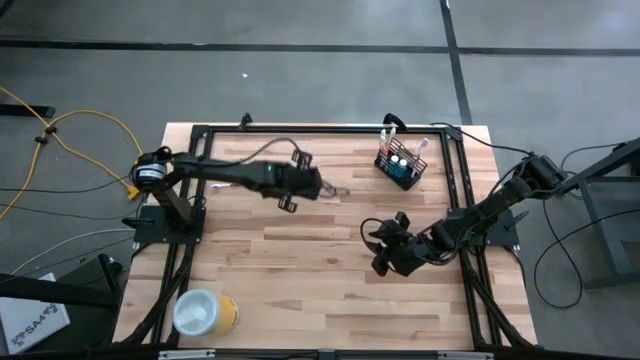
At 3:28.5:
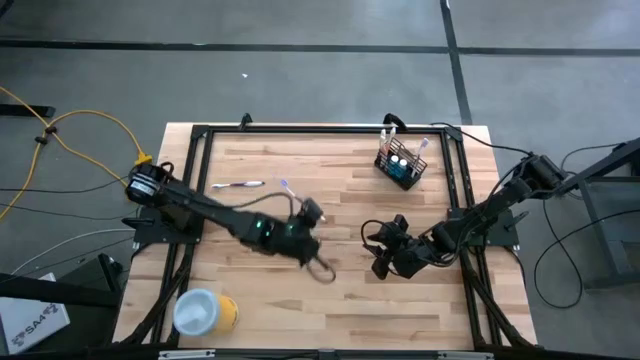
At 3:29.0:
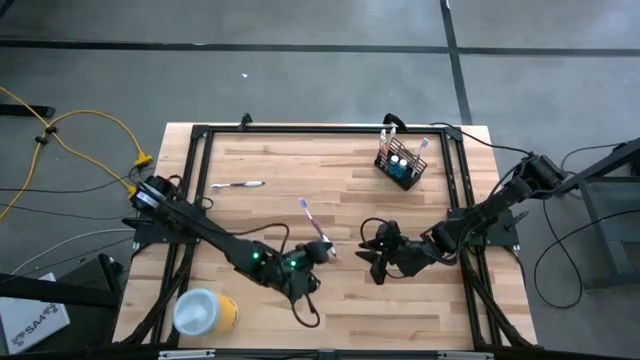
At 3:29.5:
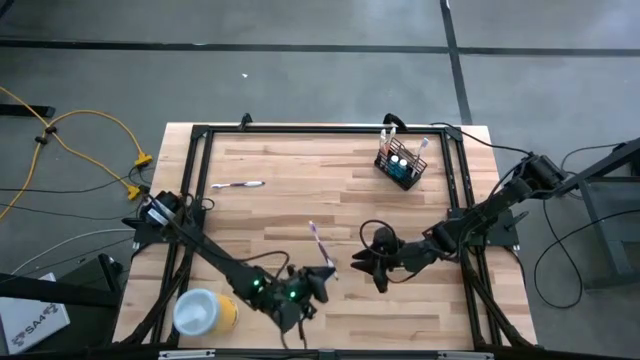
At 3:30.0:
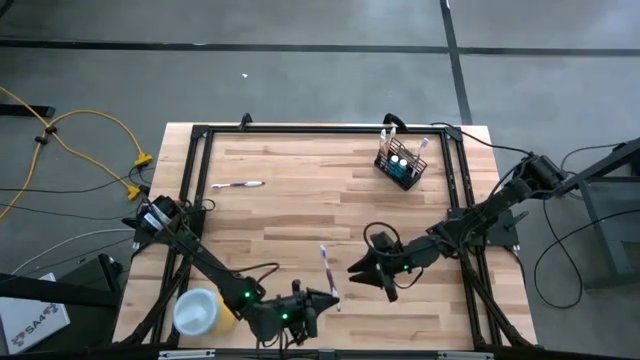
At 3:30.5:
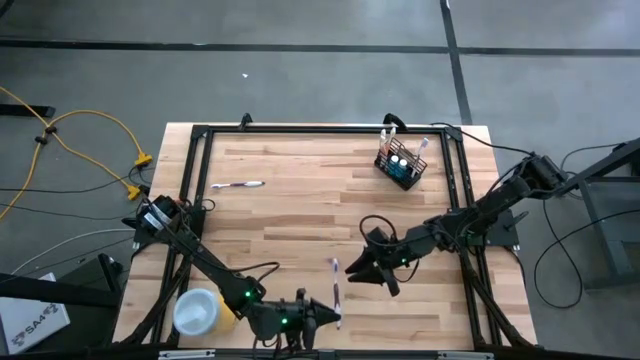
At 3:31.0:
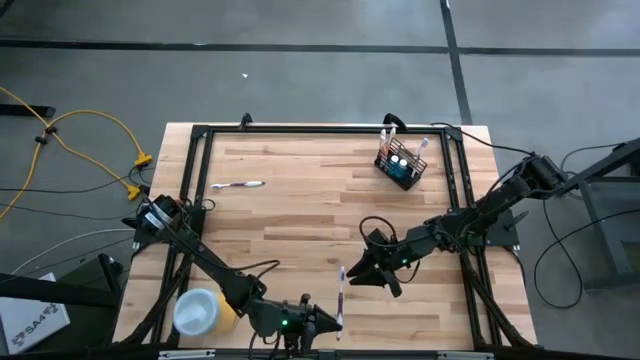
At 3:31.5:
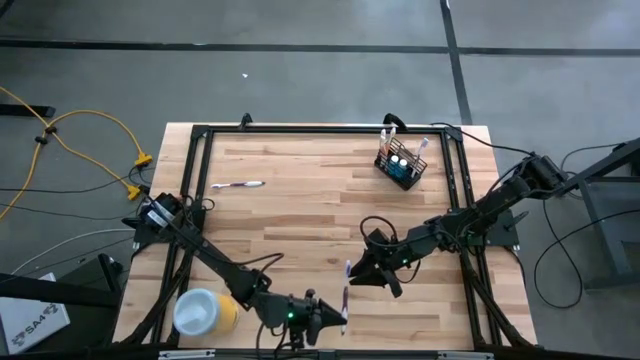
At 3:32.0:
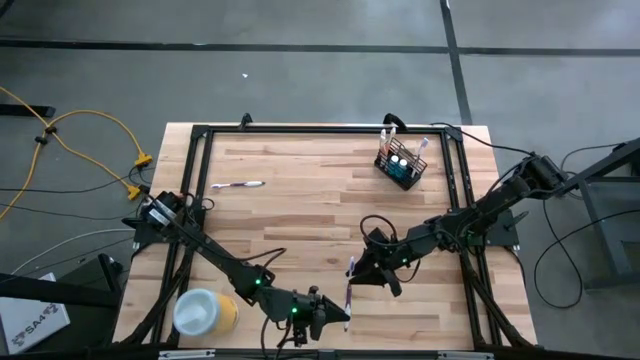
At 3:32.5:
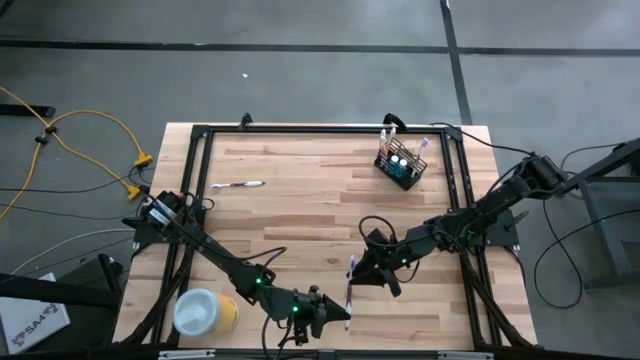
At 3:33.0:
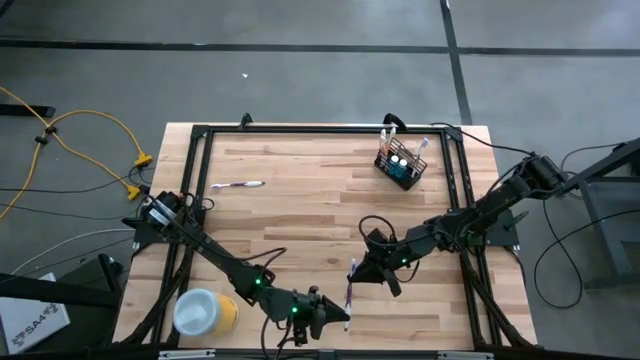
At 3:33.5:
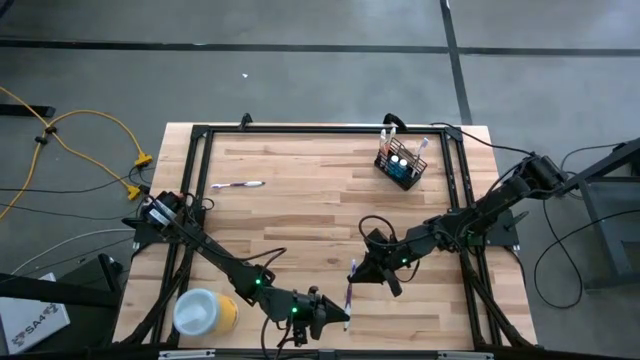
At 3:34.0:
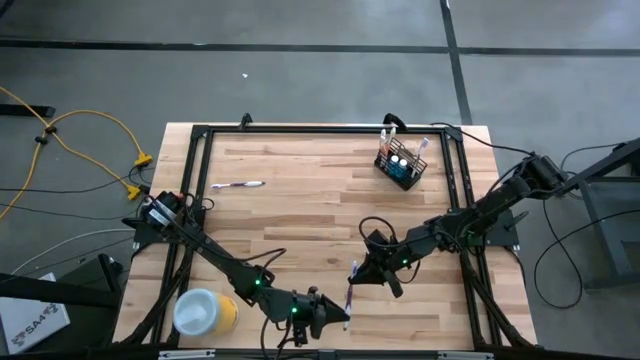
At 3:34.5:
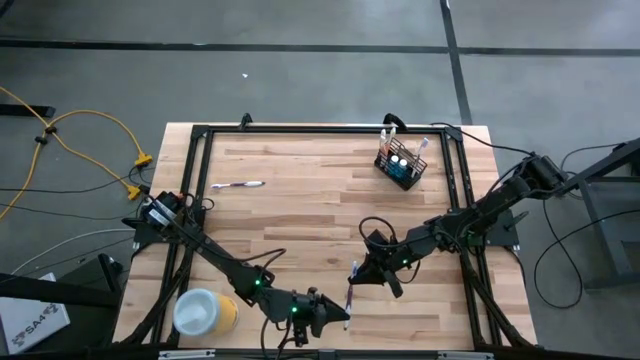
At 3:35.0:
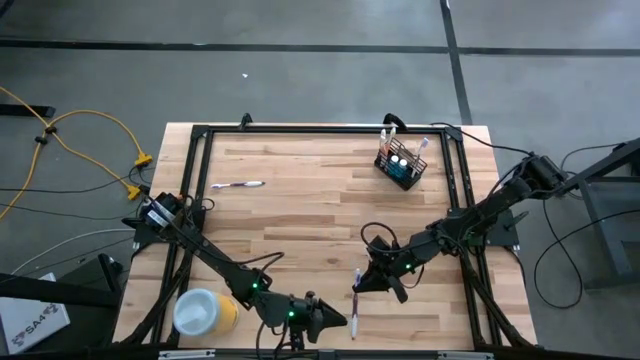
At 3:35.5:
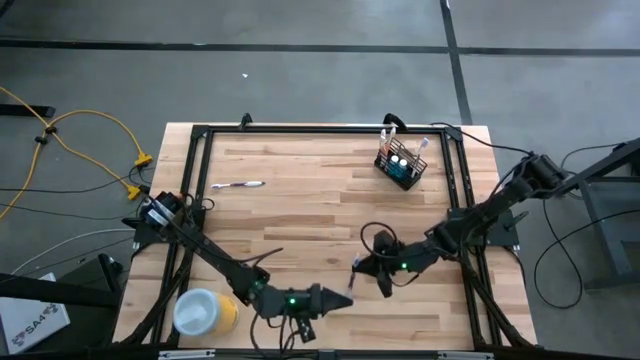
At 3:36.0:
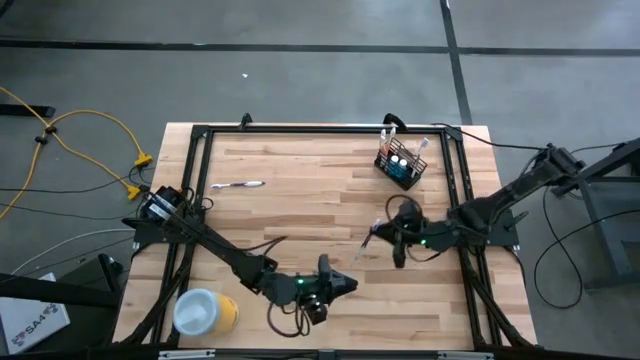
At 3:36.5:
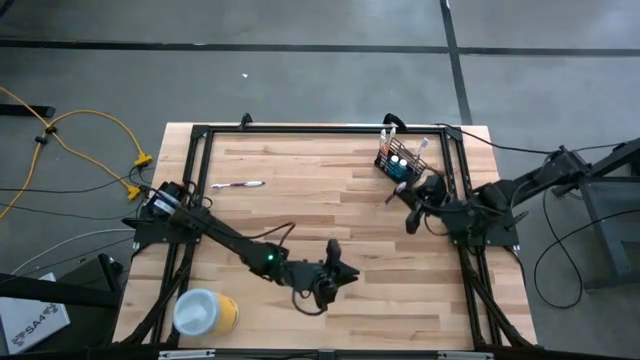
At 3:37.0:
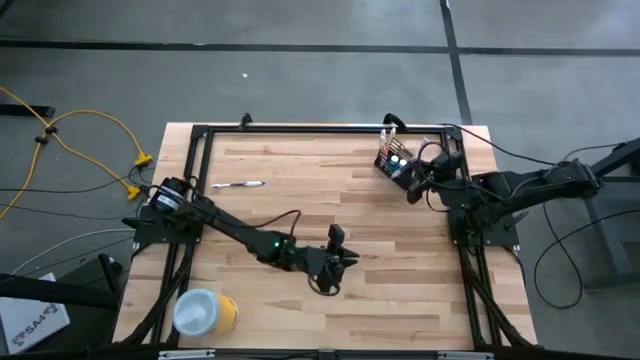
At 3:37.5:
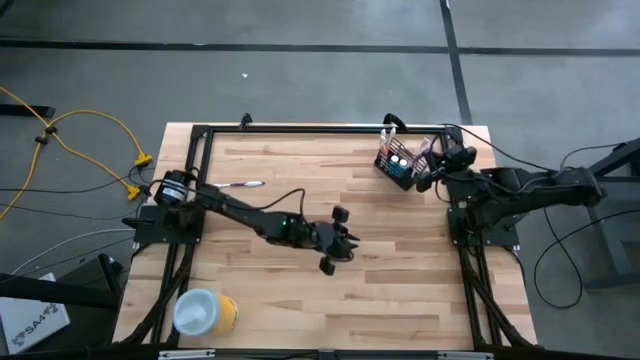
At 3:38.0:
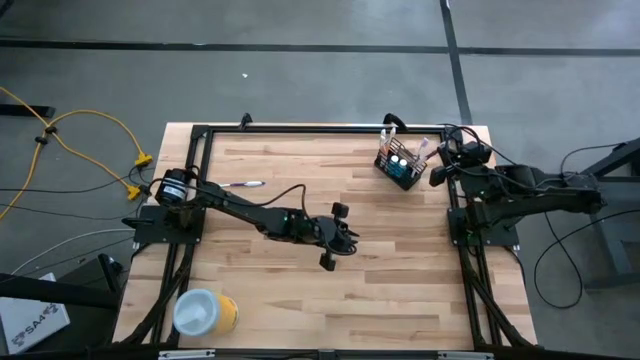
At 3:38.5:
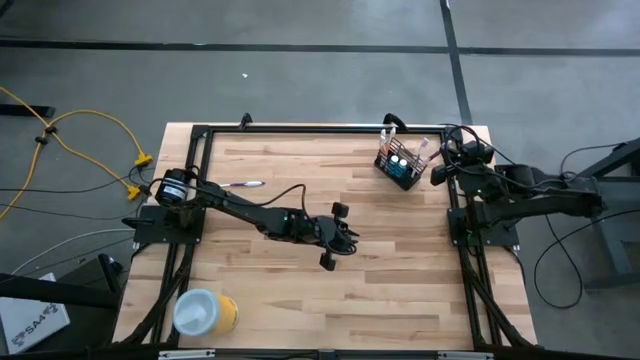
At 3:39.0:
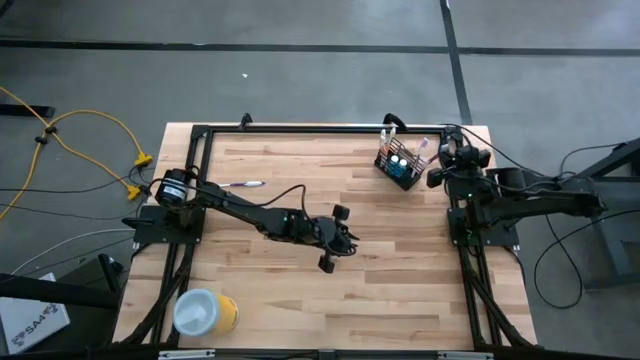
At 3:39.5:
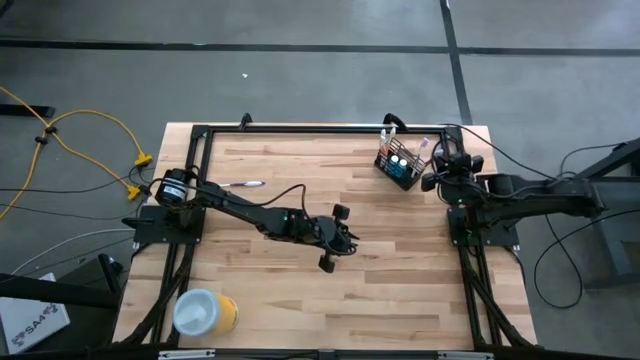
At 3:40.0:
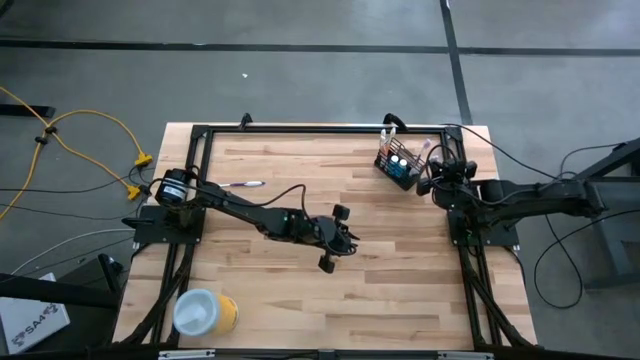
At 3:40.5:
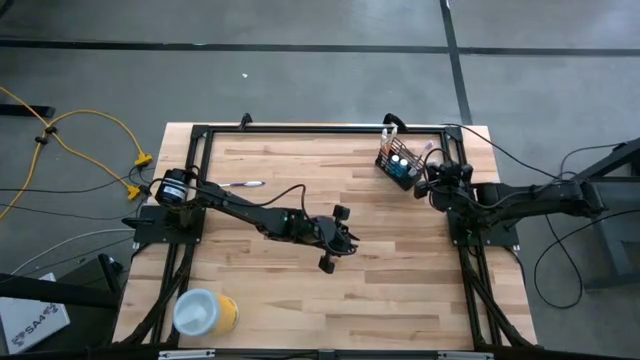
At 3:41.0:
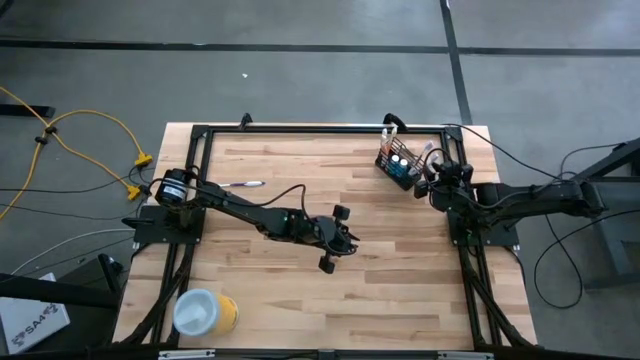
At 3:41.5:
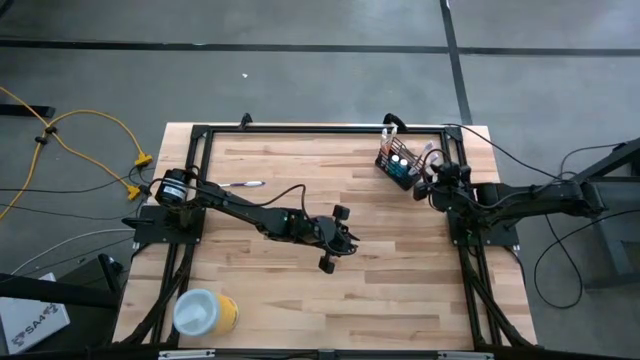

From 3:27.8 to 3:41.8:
Task: Pick & Place toothbrushing station
Put the top purple toothbrush into the right of the black mesh organizer
